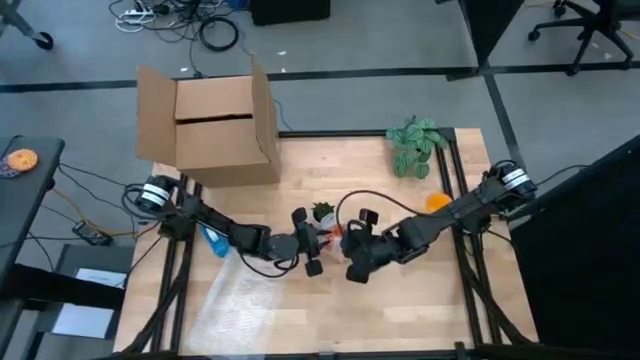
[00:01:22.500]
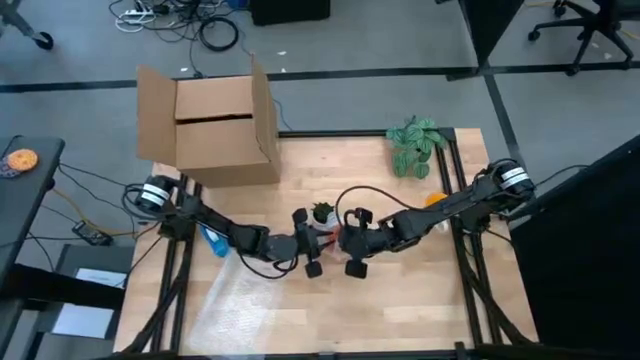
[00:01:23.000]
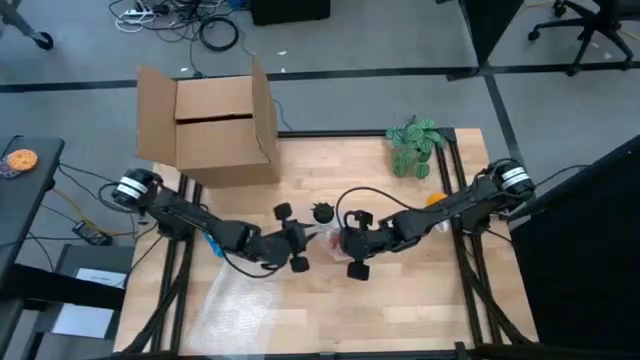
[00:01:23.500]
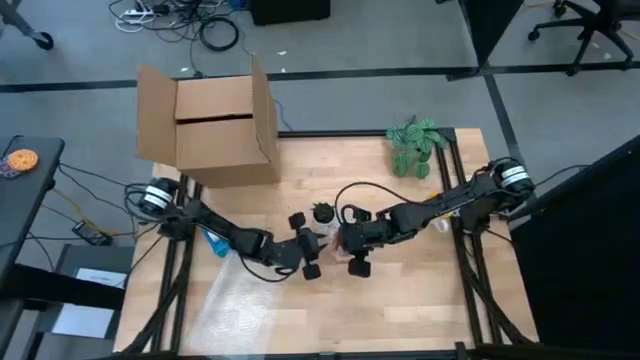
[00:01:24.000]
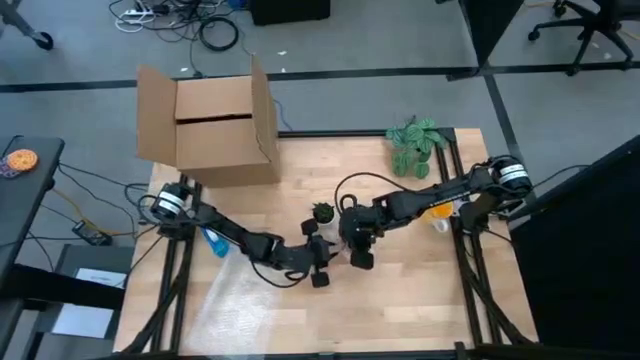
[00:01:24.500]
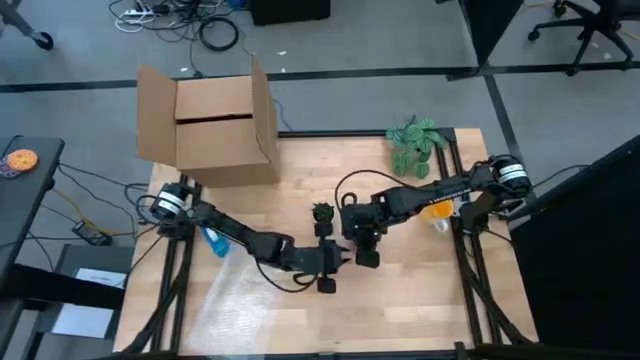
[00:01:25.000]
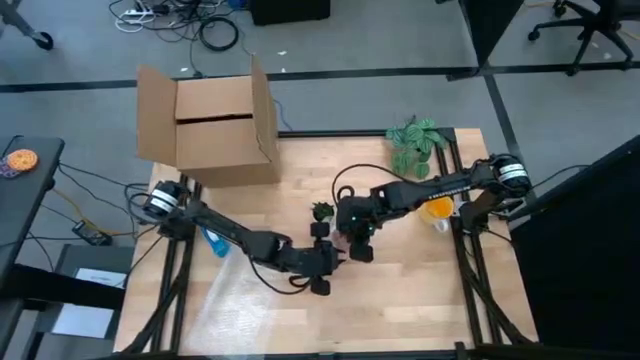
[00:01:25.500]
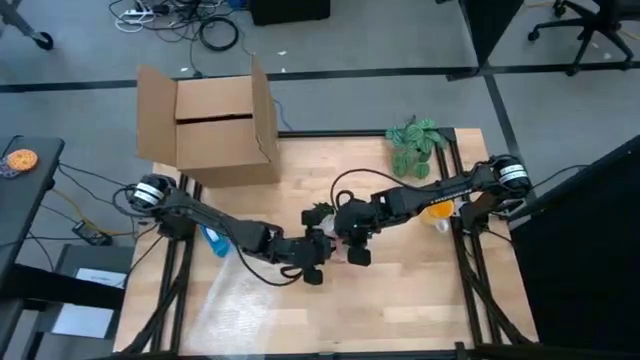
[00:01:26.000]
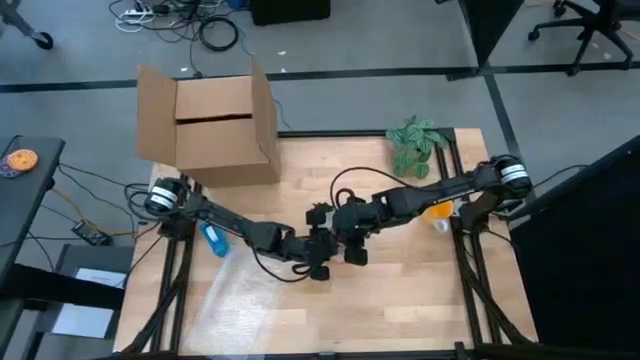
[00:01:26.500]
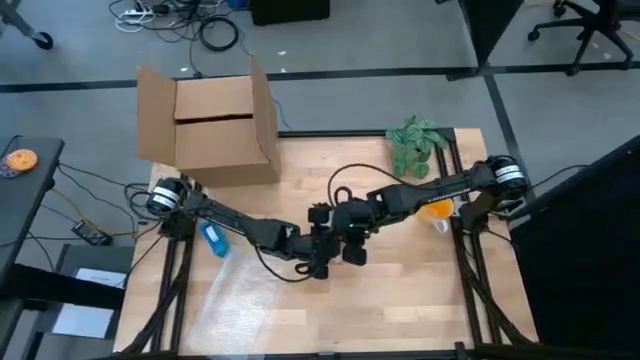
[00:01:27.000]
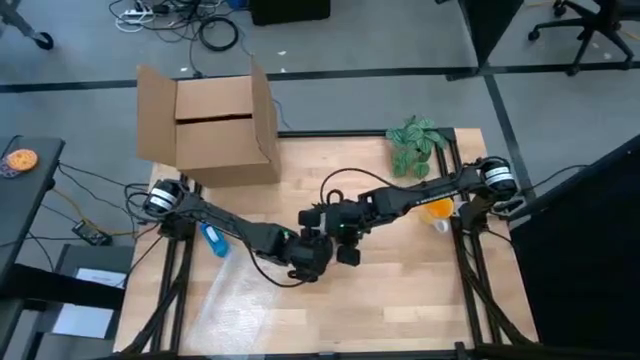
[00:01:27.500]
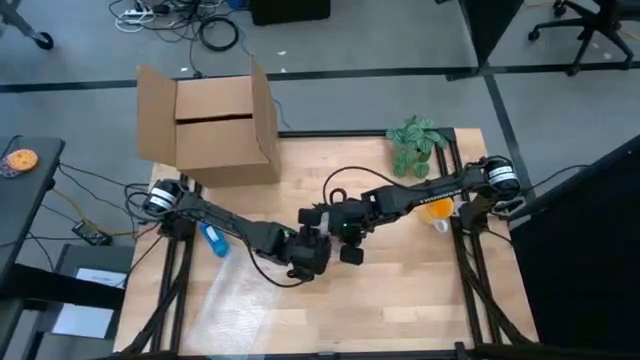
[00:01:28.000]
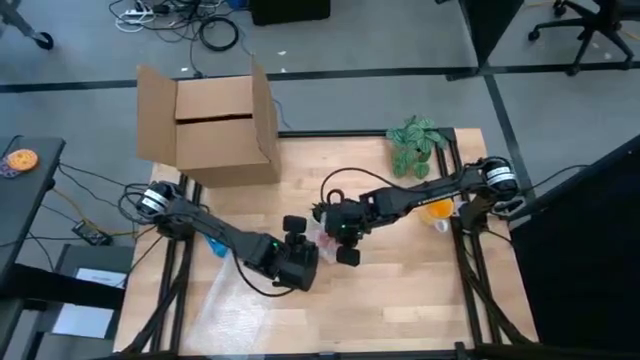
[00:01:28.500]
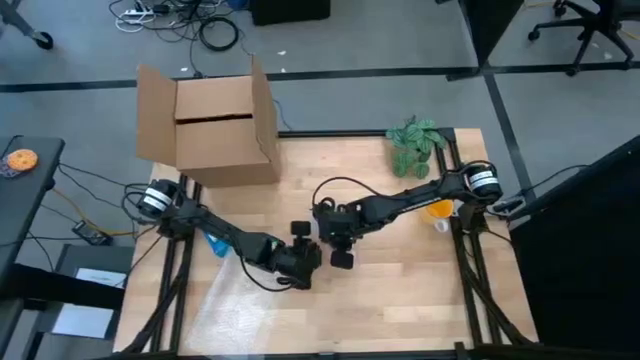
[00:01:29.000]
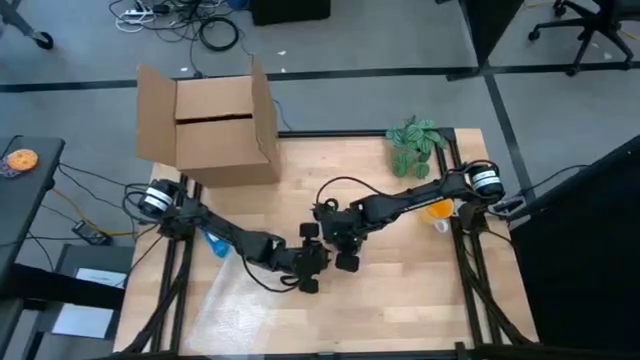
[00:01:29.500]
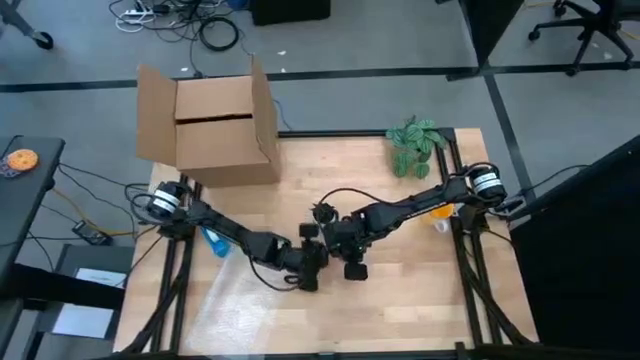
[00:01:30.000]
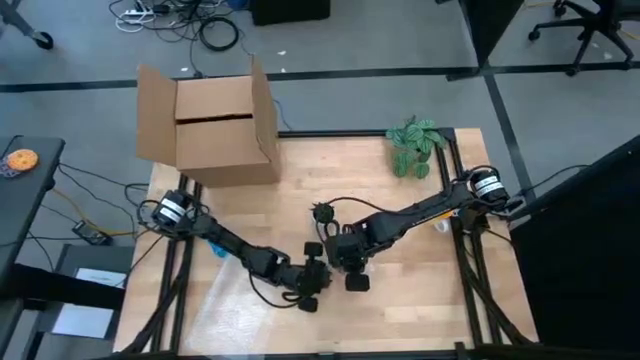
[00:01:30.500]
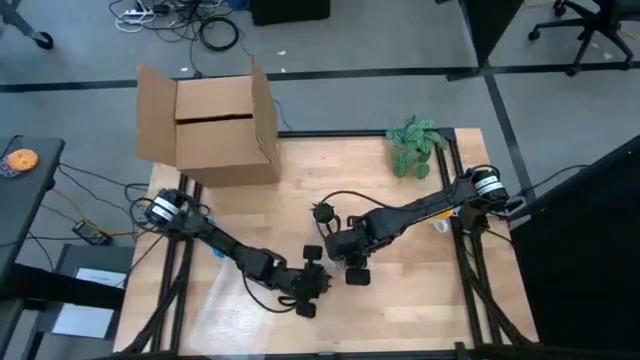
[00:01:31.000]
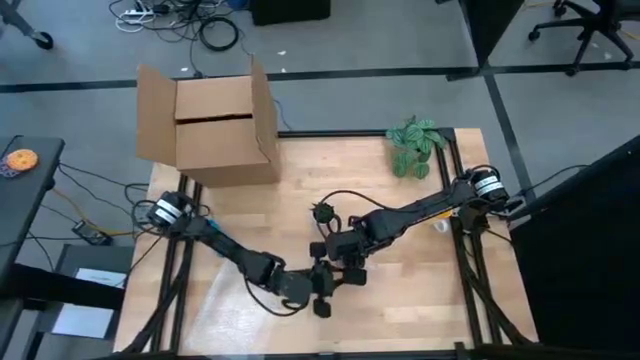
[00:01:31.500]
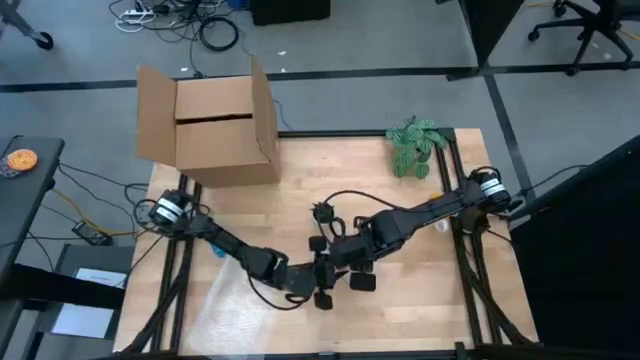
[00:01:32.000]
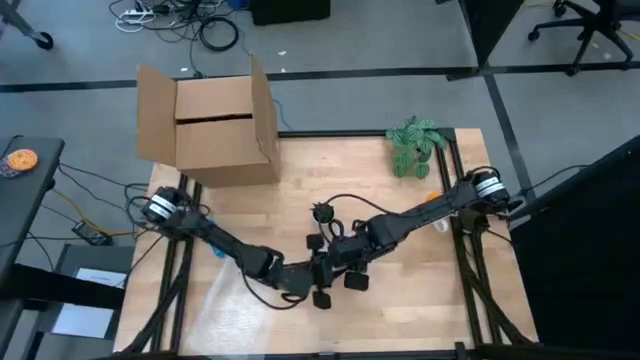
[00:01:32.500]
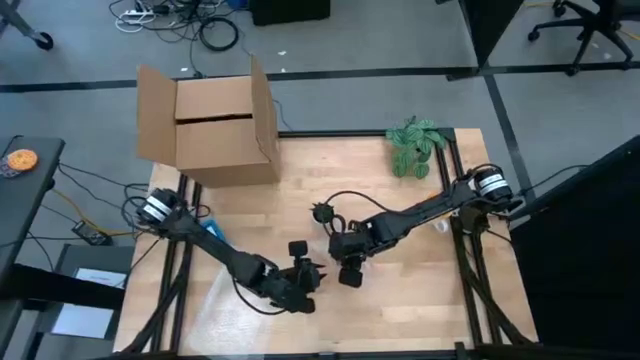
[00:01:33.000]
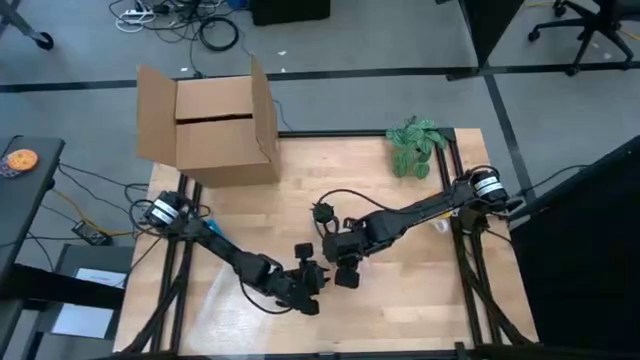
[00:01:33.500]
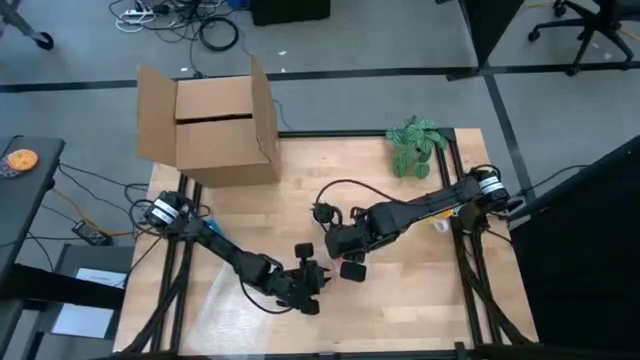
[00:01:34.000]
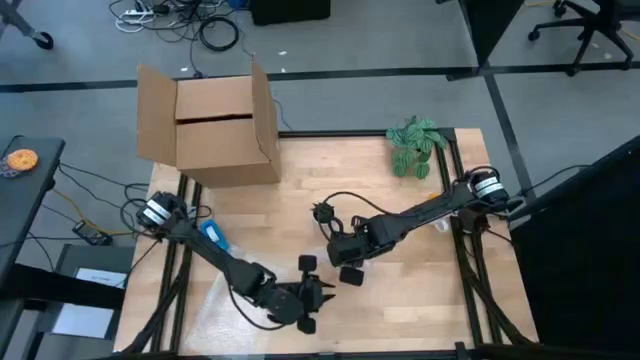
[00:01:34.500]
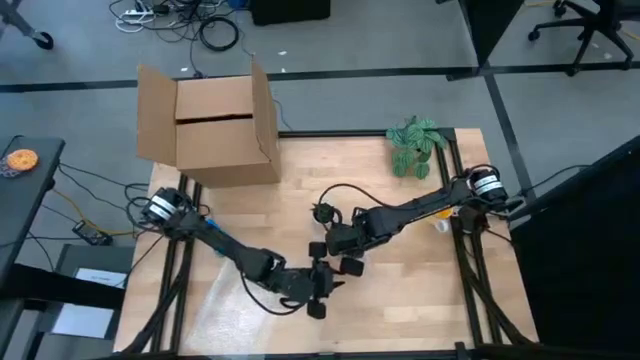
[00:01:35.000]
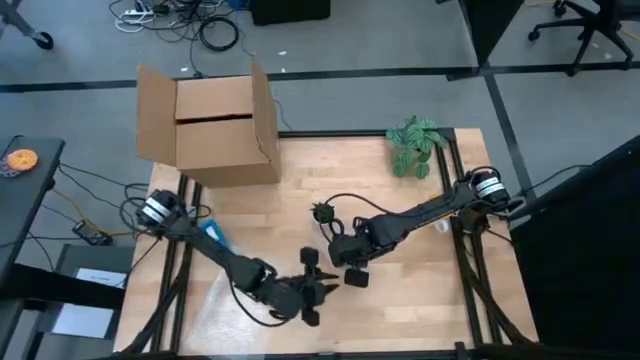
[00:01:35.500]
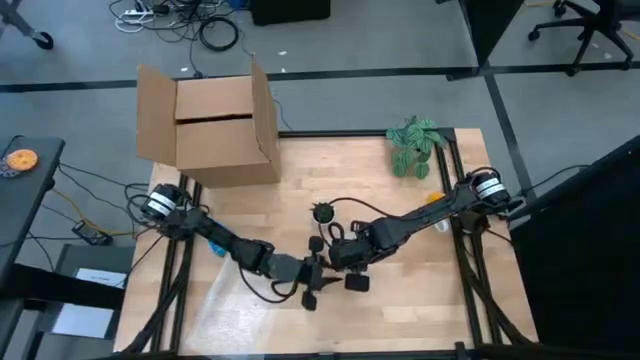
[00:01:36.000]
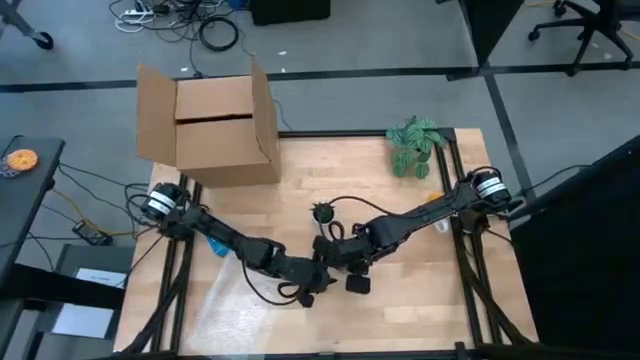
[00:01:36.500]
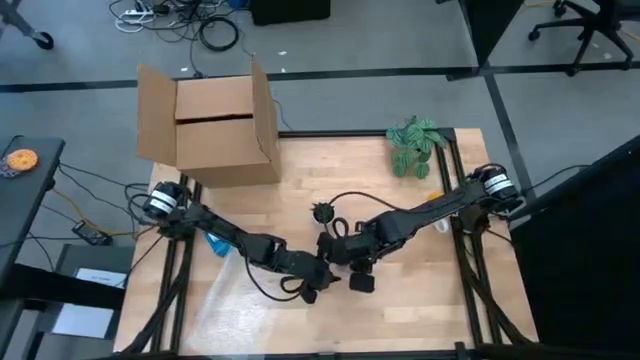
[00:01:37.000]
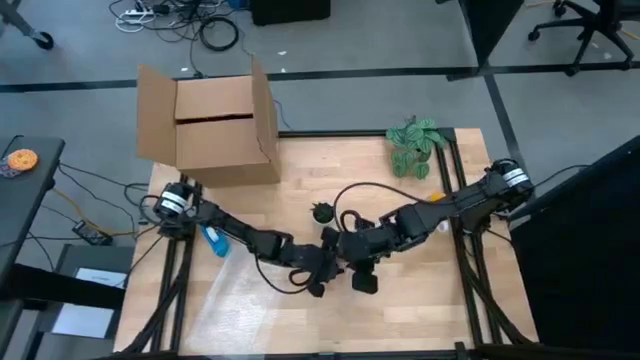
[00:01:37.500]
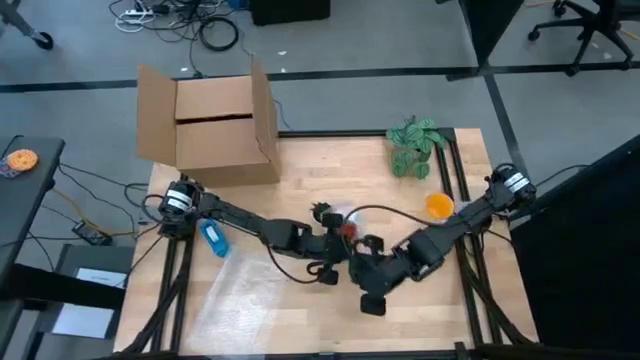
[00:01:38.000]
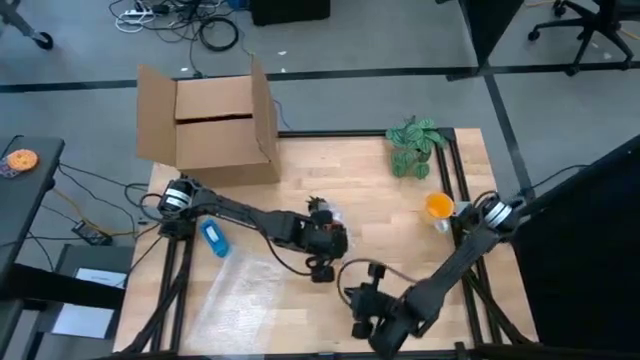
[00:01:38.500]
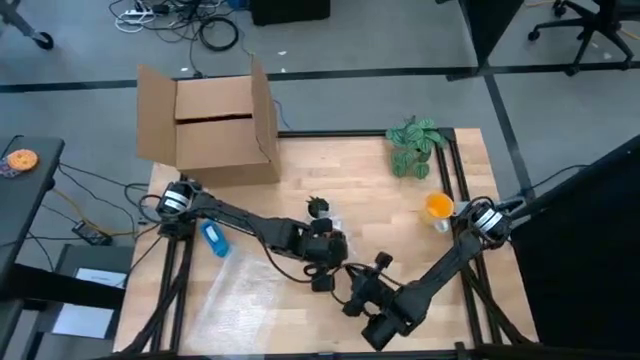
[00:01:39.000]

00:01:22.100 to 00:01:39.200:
Task: wrap mug
Wrap the orange mug with the transparent bubble wrap
